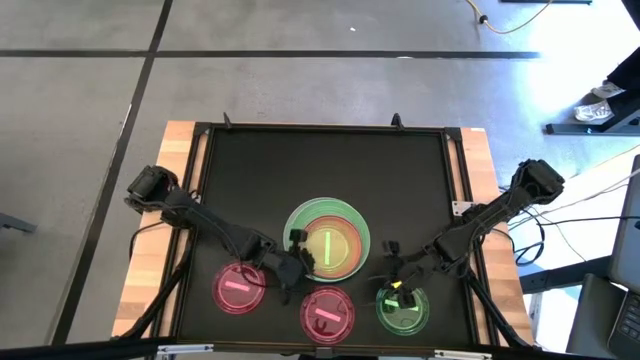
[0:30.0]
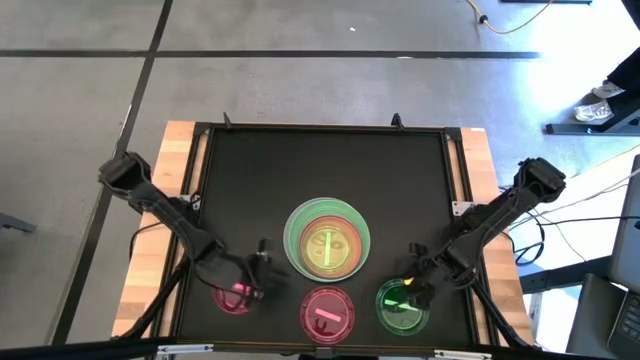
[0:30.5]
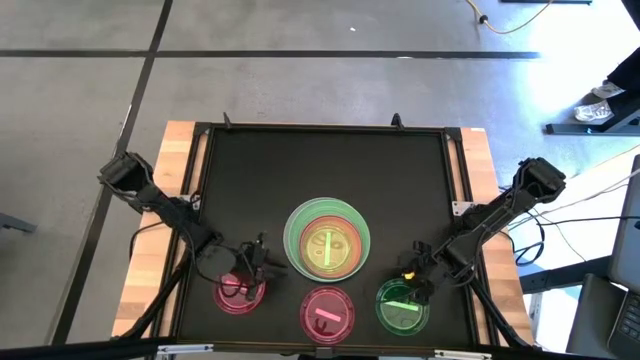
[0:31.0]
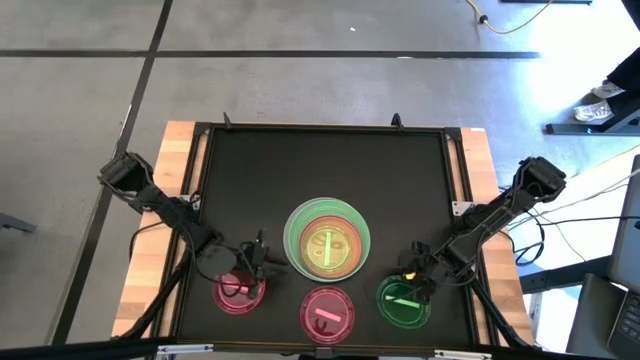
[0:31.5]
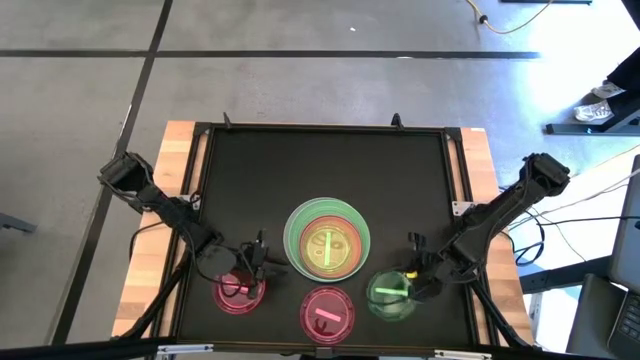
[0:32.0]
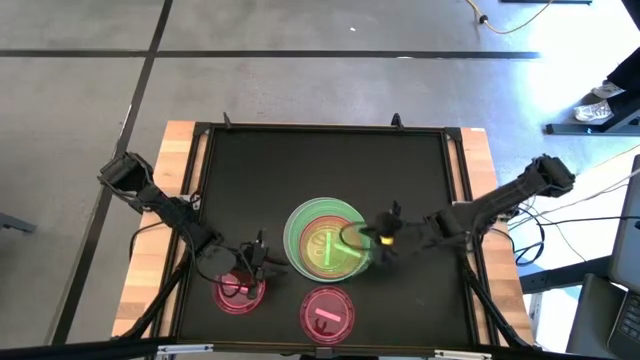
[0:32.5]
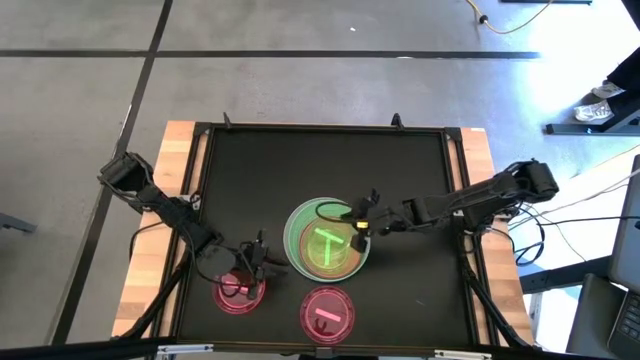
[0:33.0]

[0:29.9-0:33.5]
Task: Stack plastic plates
Stack the transparent green plate on top of the transparent green plate

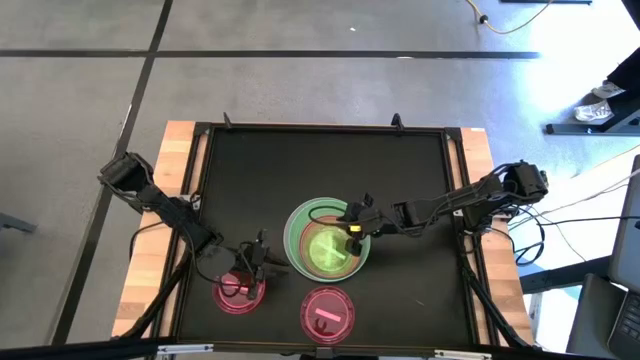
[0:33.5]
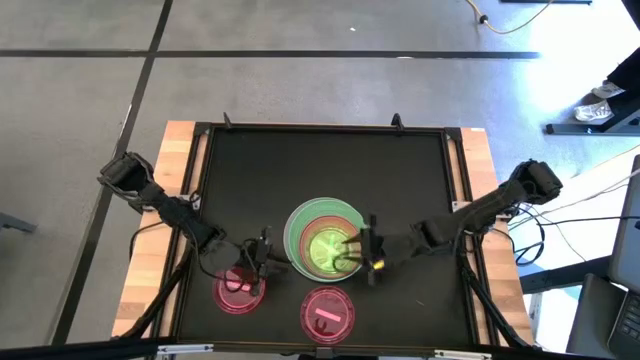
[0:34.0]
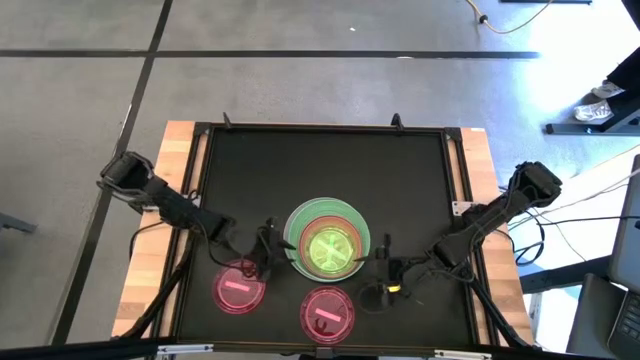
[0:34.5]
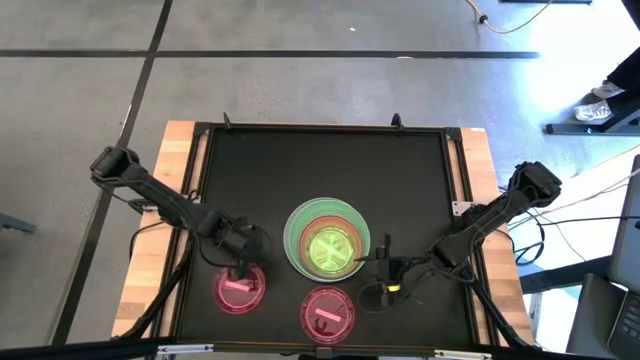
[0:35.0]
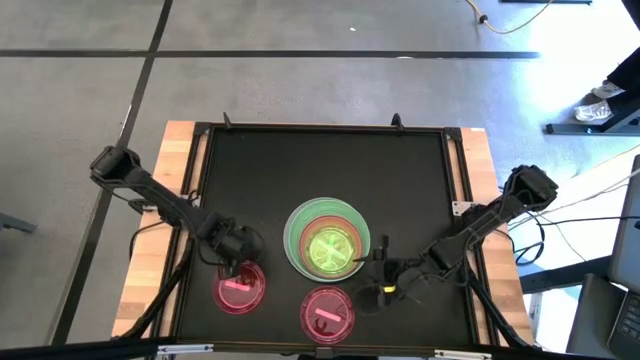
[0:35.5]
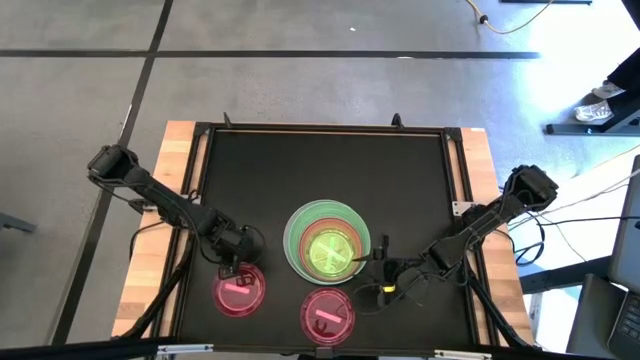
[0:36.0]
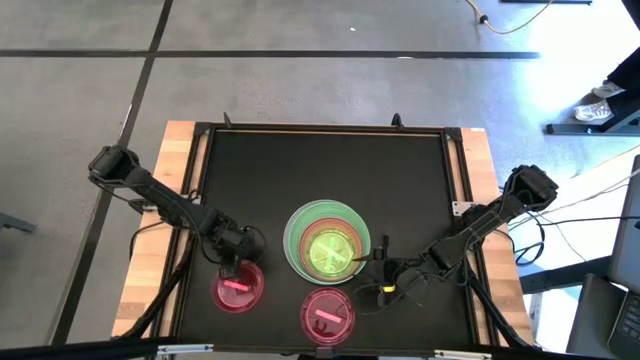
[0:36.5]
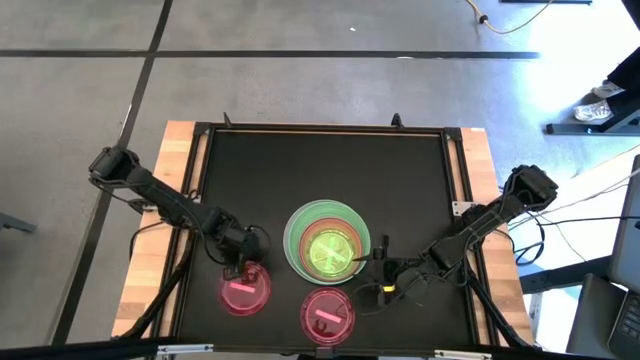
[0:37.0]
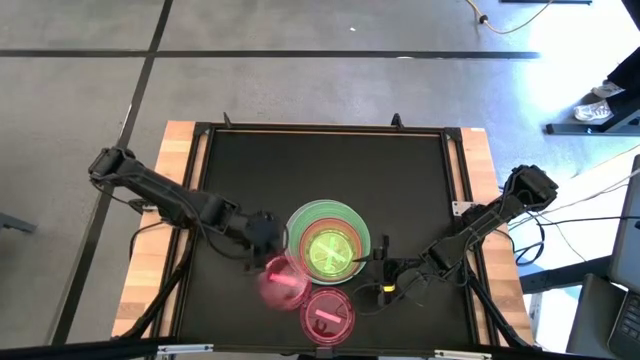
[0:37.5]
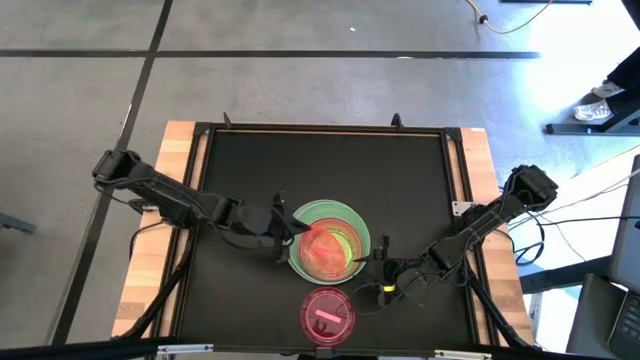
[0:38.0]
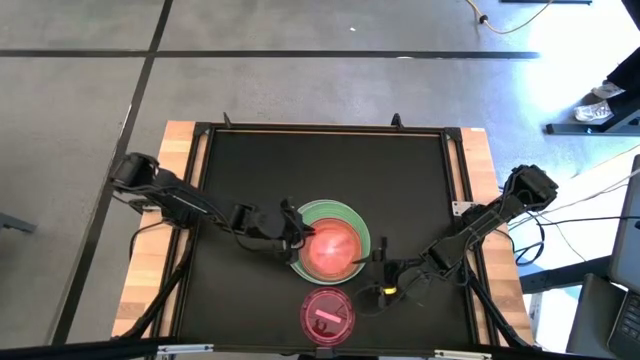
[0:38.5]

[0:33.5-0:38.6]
Stack the left transparent red plate on top of the transparent green plate

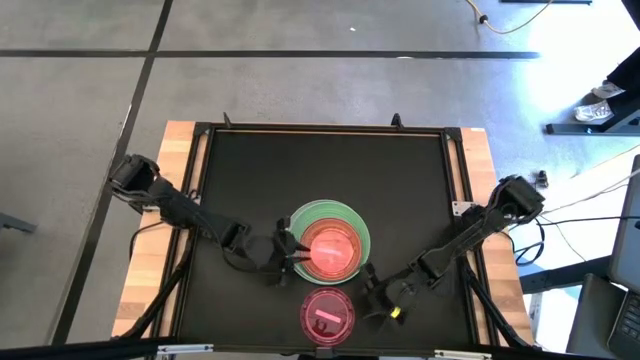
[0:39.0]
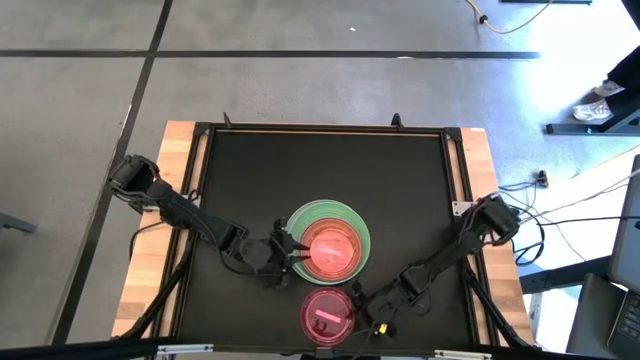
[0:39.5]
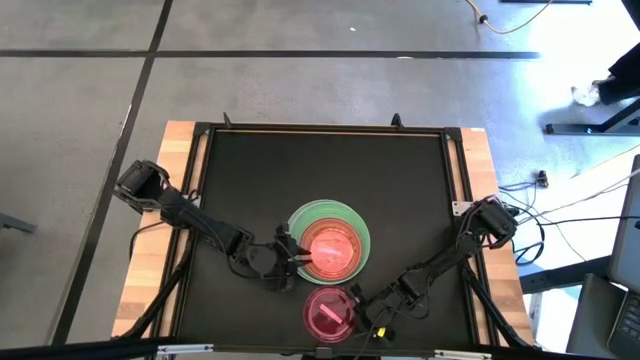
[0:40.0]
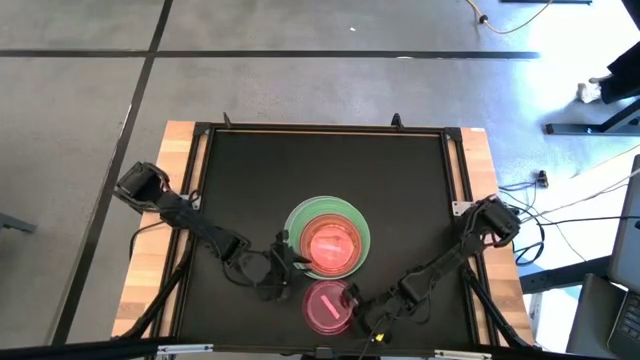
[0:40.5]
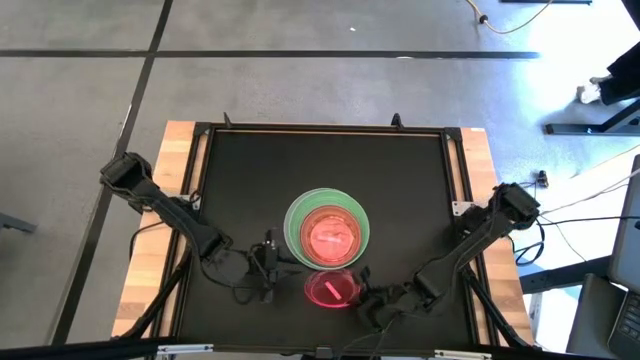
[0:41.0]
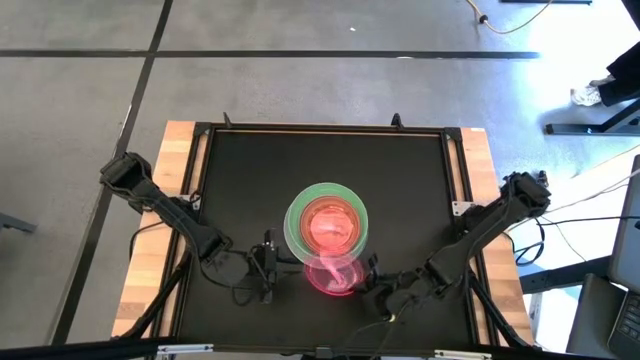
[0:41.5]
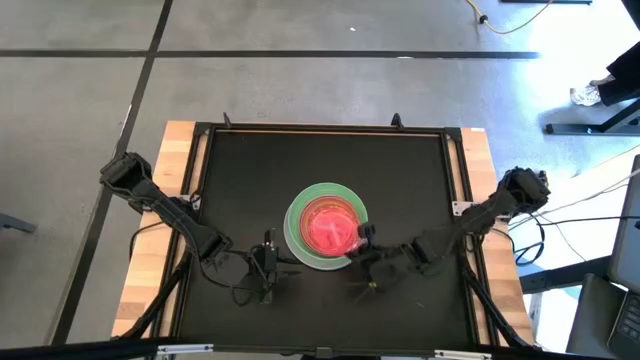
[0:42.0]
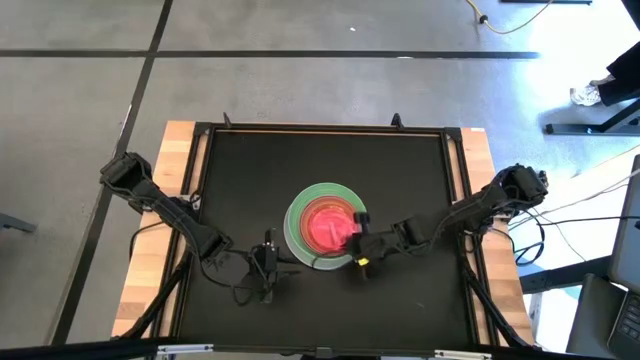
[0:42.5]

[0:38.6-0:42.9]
Stack the transparent red plate on top of the transparent red plate

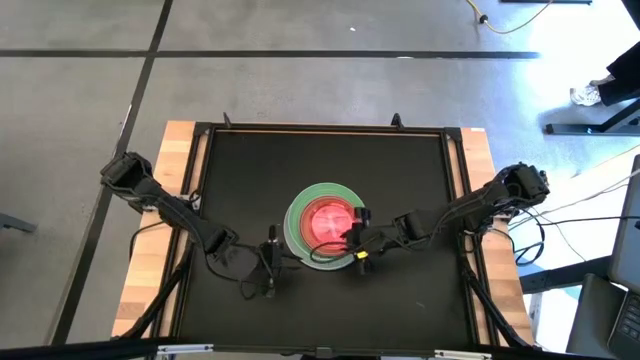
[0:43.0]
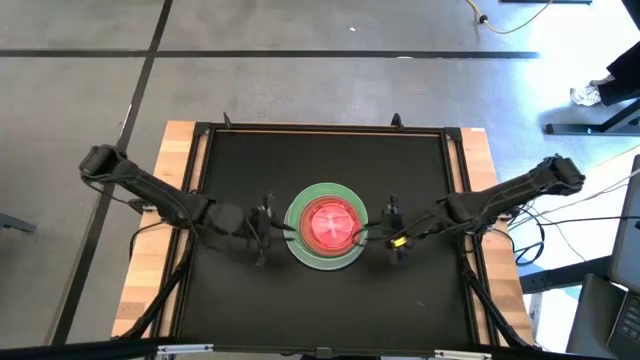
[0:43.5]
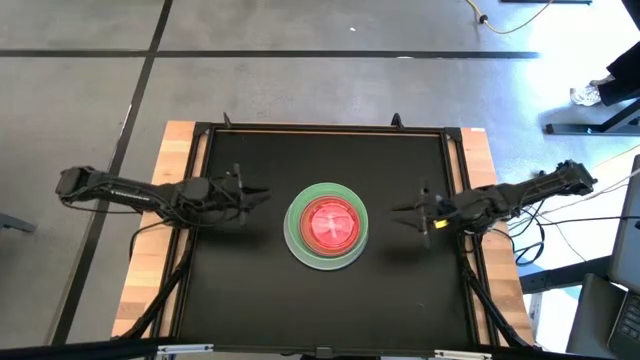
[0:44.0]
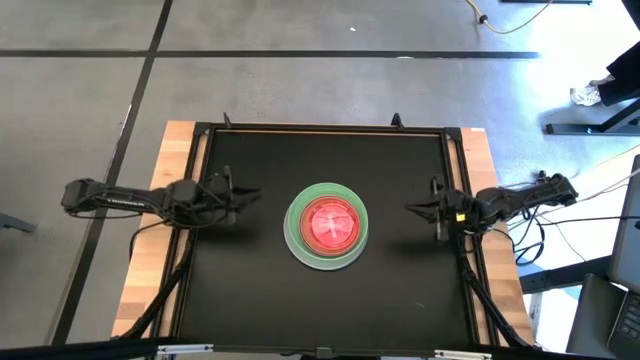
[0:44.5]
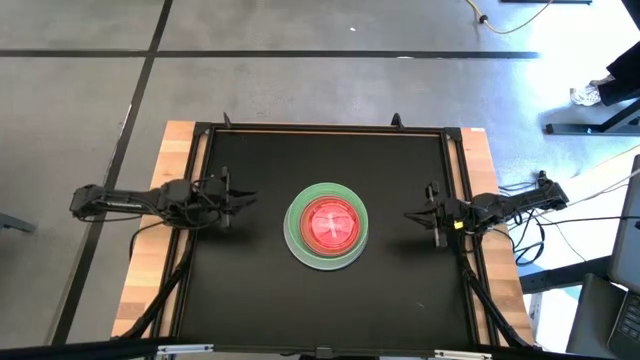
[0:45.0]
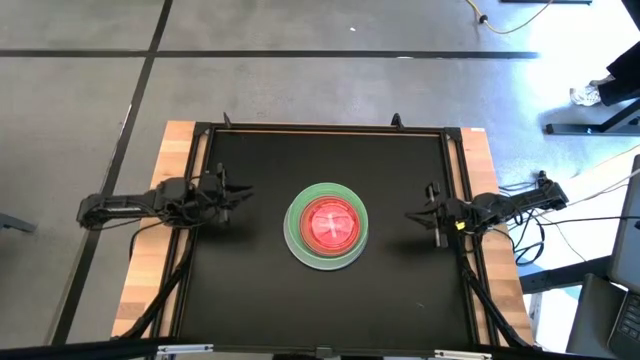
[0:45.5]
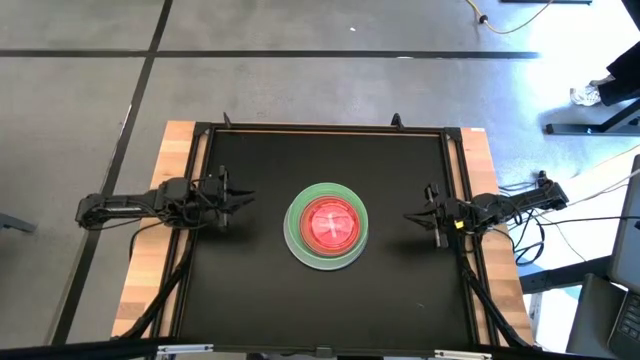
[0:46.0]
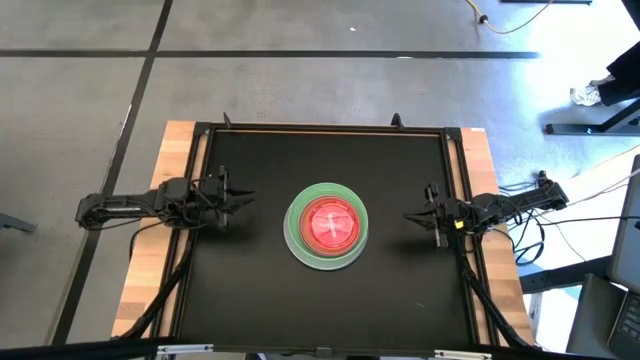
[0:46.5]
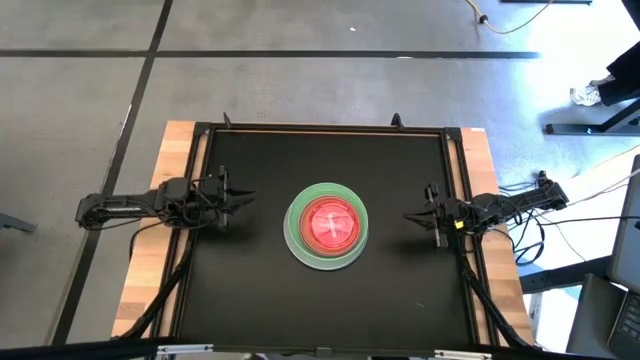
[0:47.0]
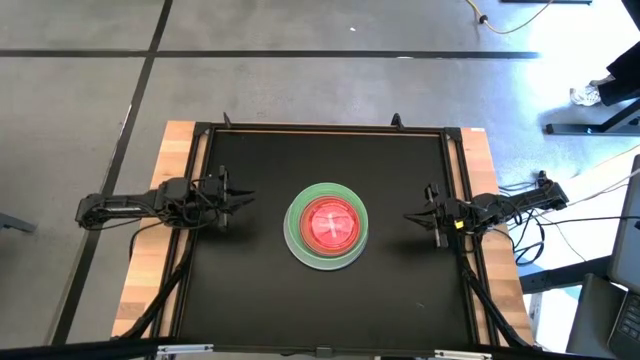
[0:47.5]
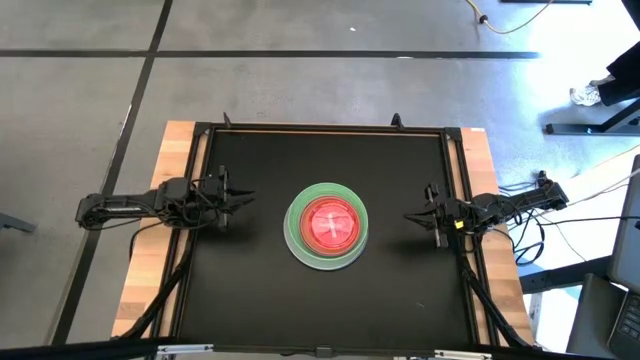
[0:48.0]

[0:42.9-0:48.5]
Return to Home Position

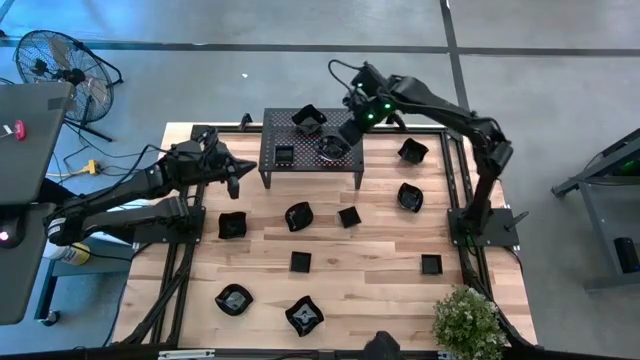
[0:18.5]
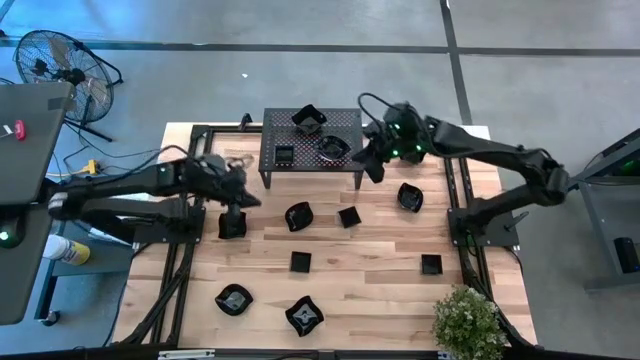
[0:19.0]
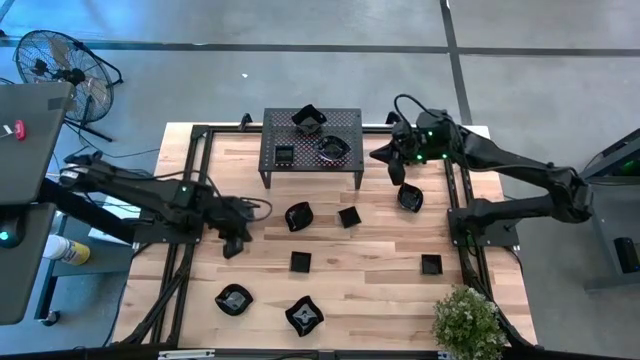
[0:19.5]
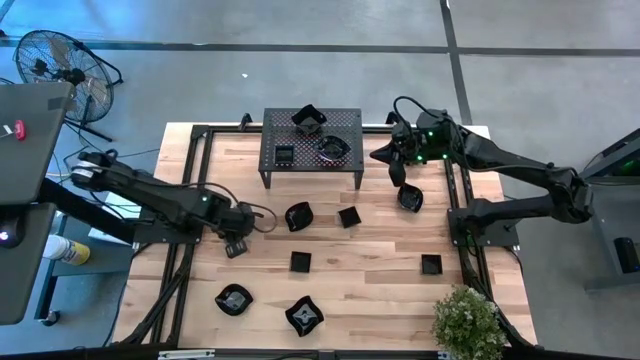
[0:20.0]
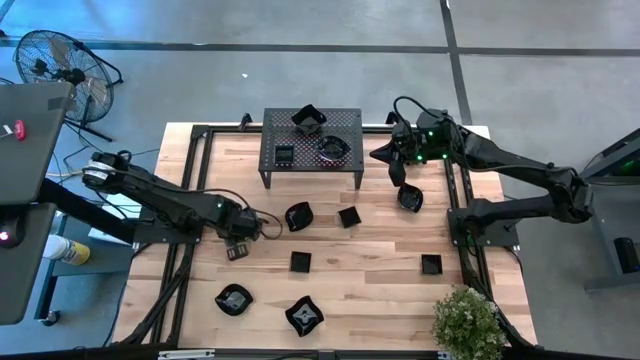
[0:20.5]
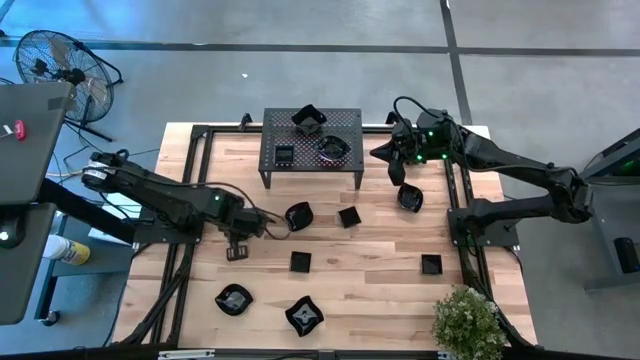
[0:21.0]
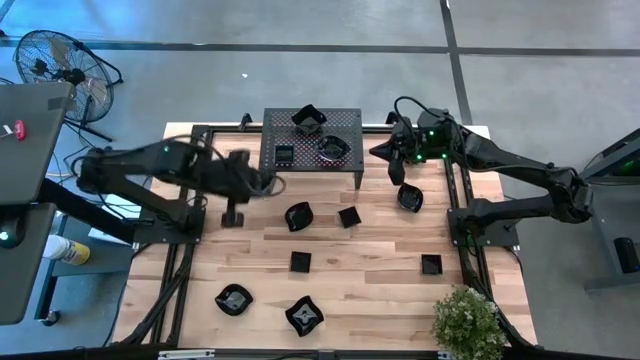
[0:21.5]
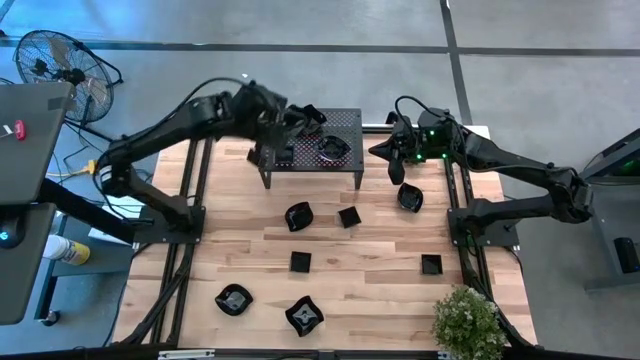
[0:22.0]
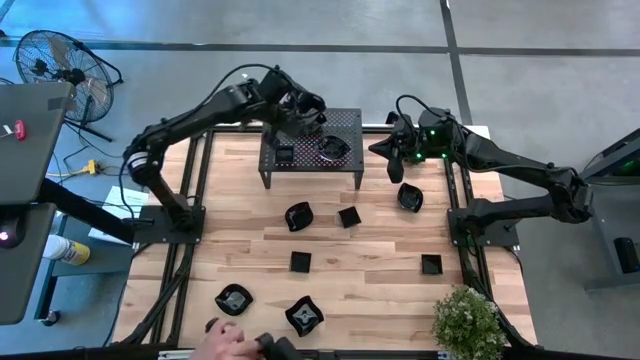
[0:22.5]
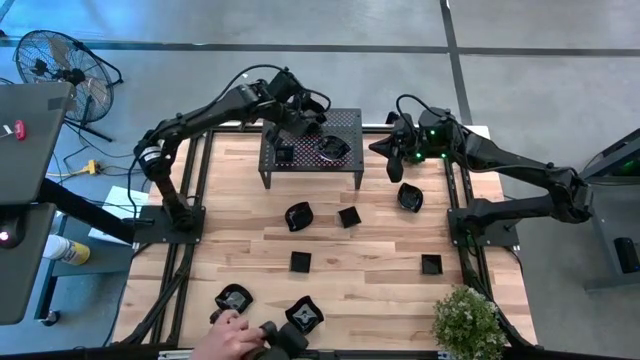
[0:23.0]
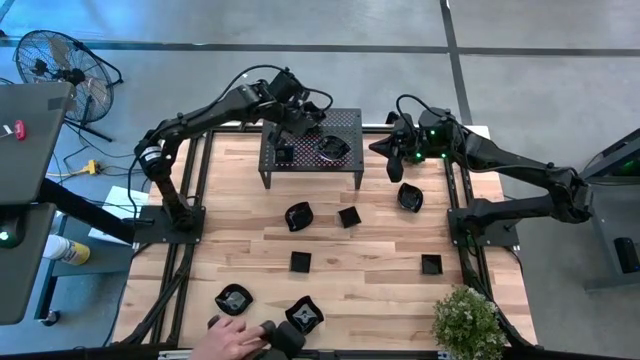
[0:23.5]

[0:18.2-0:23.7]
Task: Pick & Place Mini shaped plates
Stack the black distorted square plate on top of the black distorted shaped plate on the shelf
